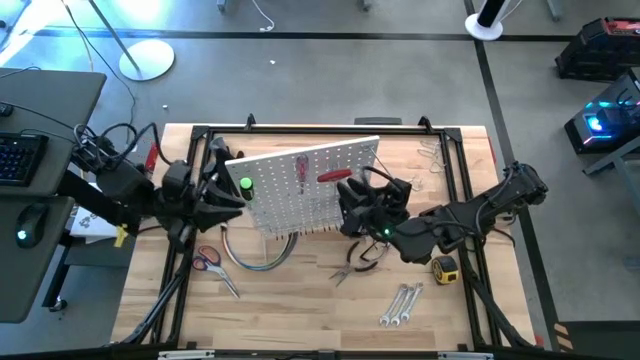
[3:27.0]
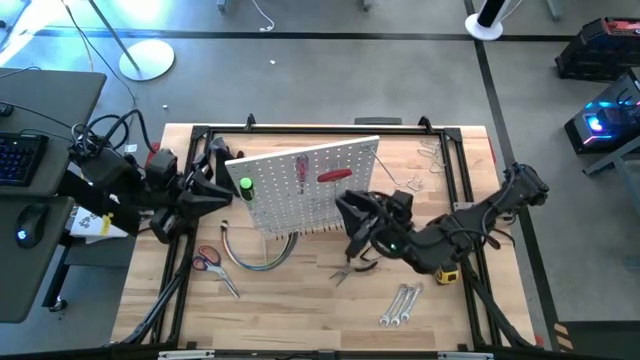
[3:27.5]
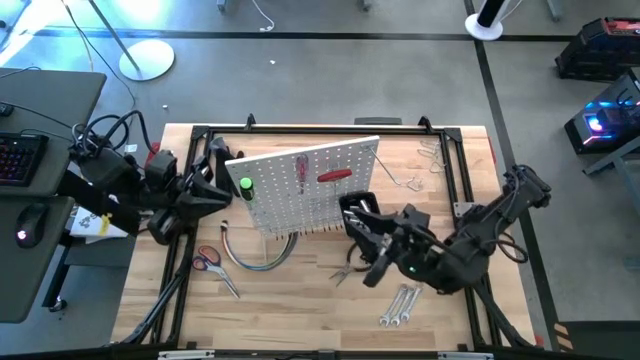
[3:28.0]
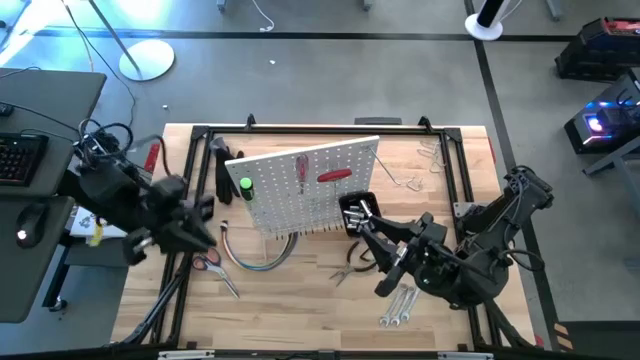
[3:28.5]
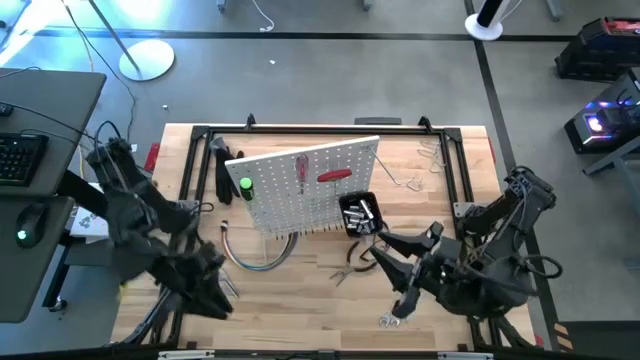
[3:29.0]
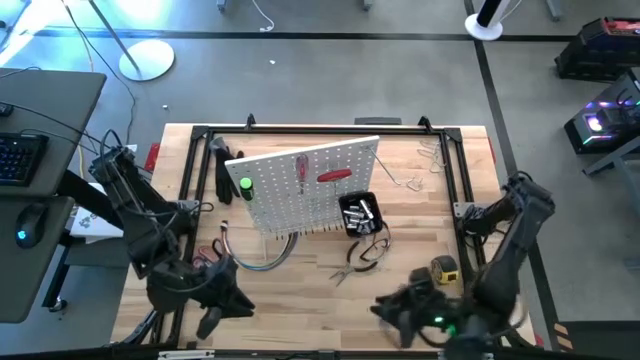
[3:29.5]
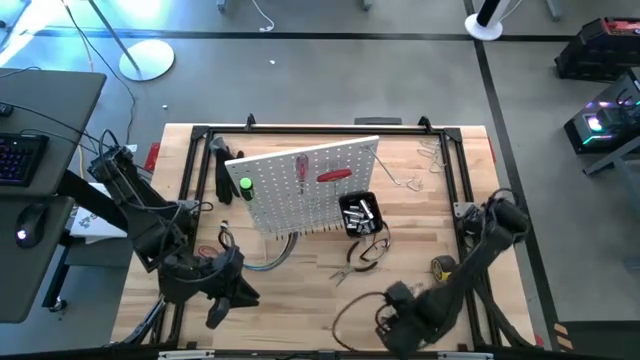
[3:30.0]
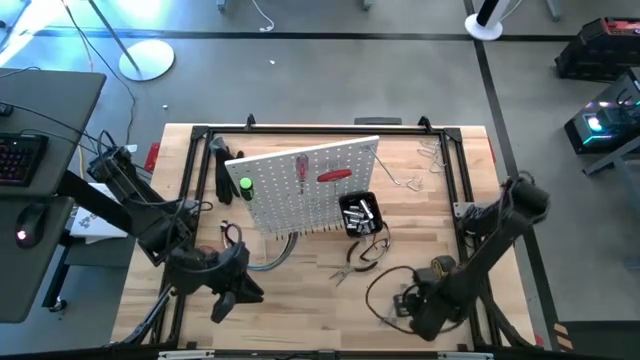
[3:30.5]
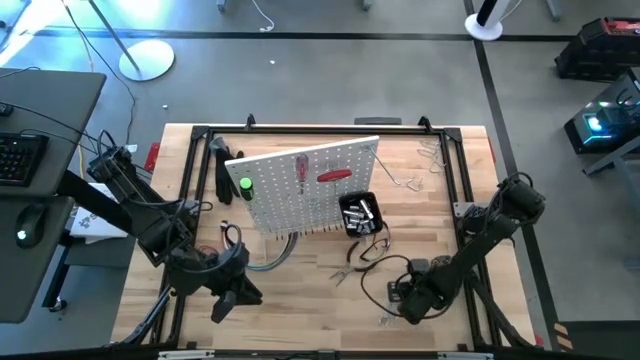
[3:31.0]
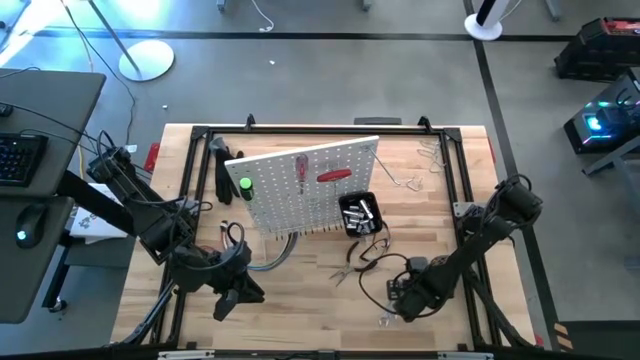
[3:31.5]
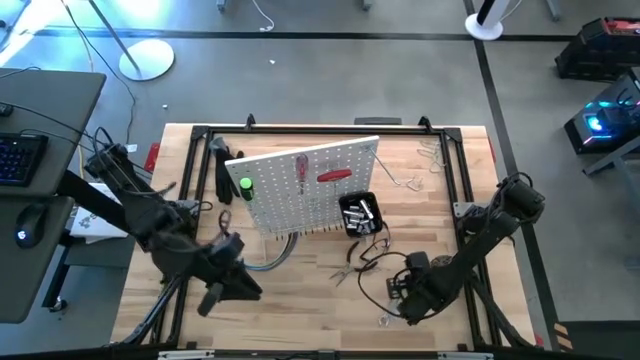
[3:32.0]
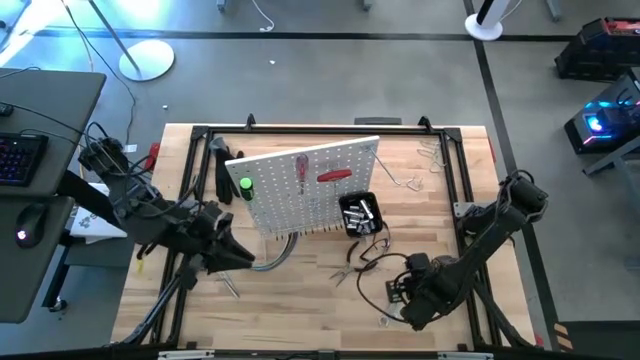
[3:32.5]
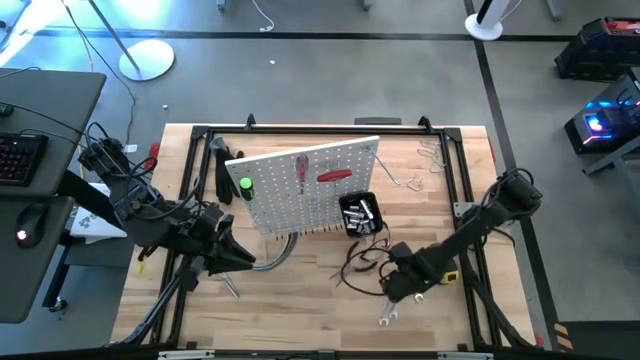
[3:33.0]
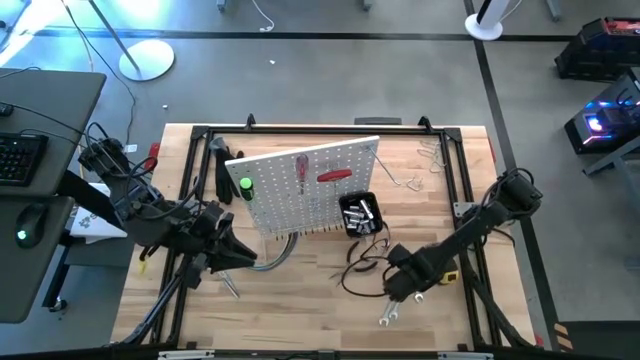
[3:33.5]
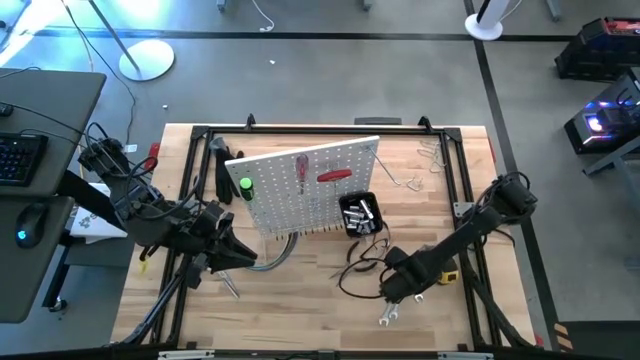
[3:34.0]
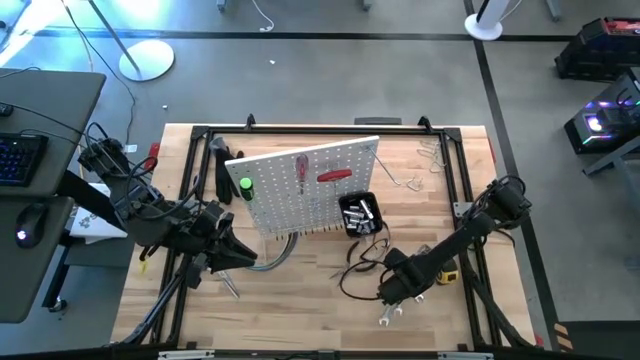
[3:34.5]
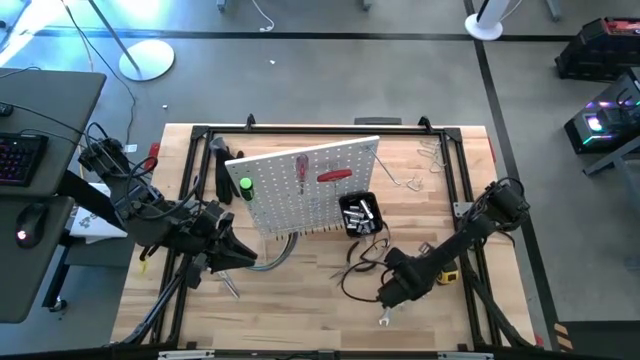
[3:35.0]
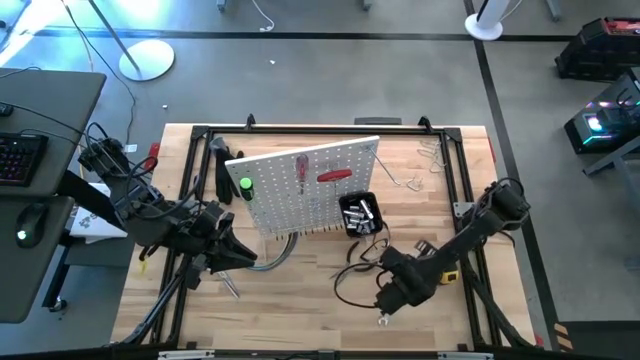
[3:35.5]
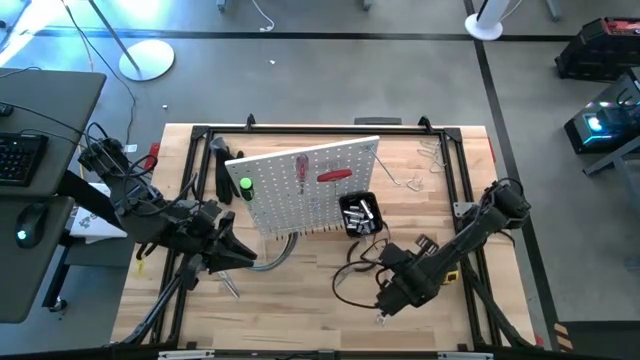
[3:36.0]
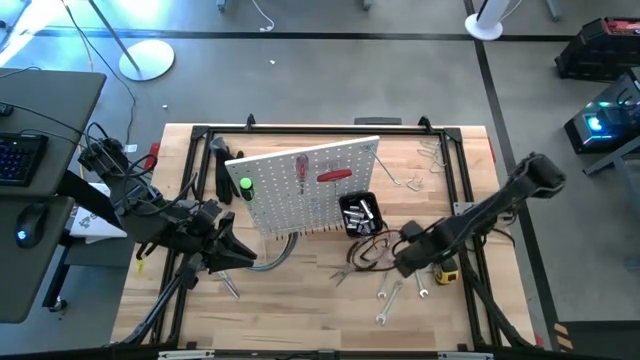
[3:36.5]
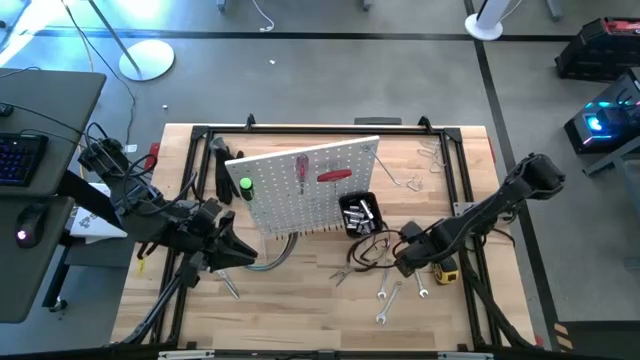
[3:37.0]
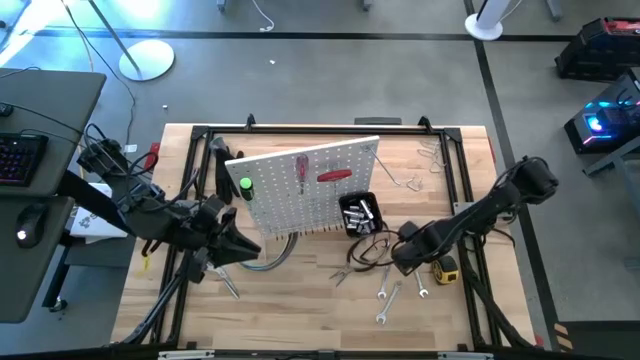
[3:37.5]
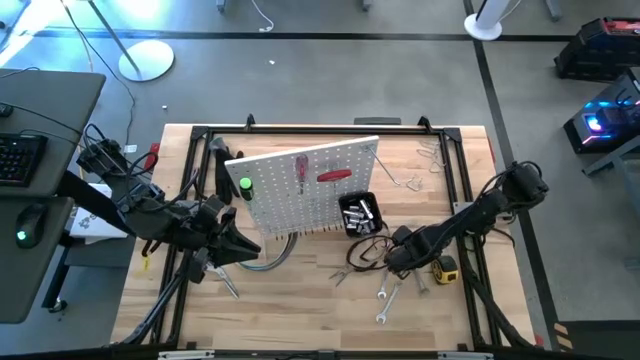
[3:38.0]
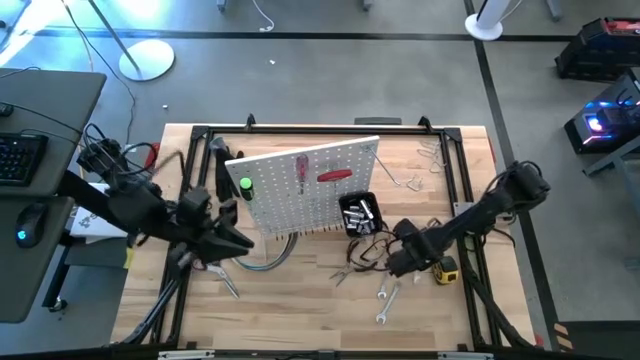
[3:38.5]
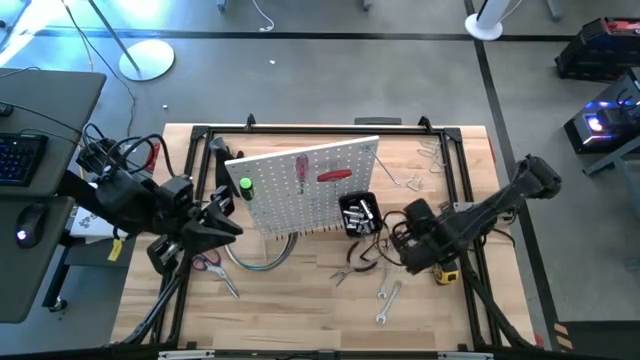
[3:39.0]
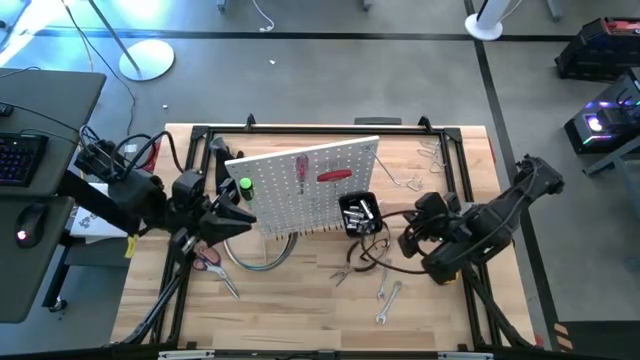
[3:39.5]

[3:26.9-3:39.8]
Task: Hang tools onto peg board
Hang the wrench on the peg board

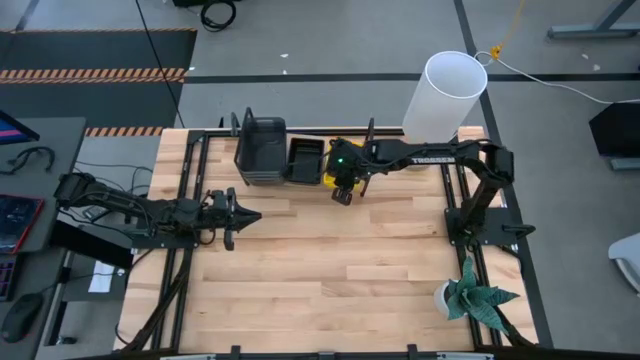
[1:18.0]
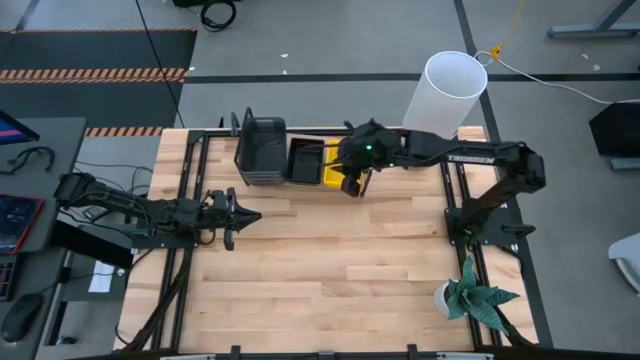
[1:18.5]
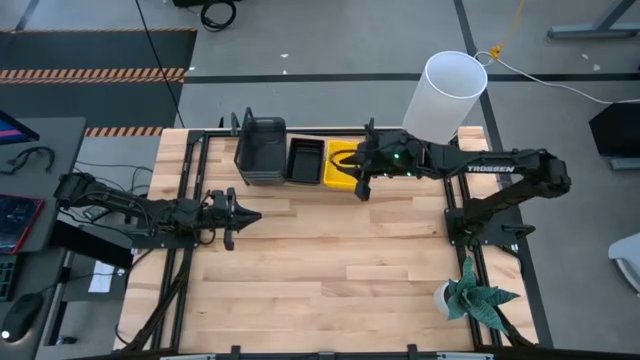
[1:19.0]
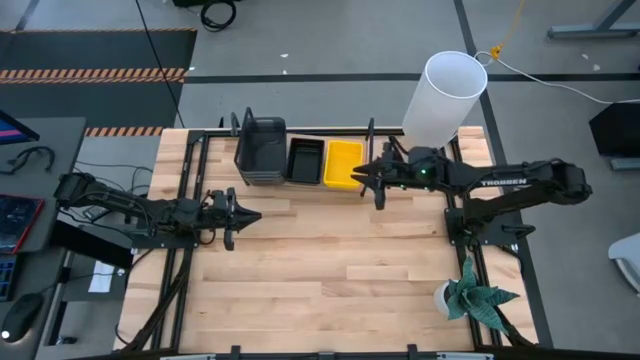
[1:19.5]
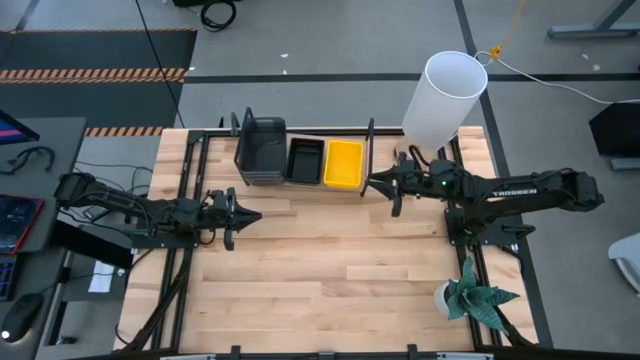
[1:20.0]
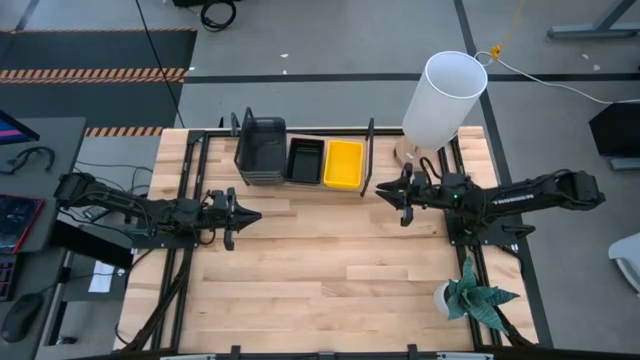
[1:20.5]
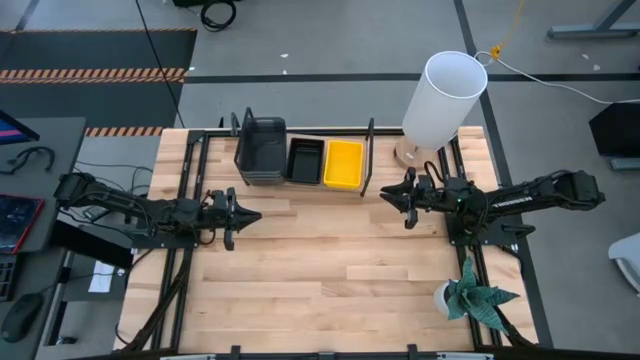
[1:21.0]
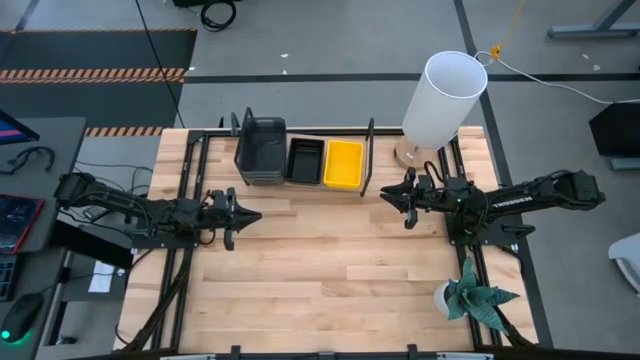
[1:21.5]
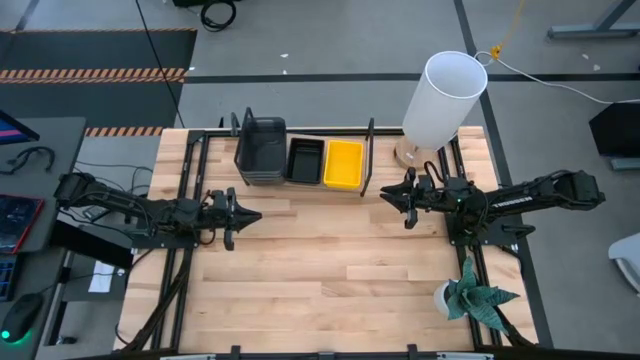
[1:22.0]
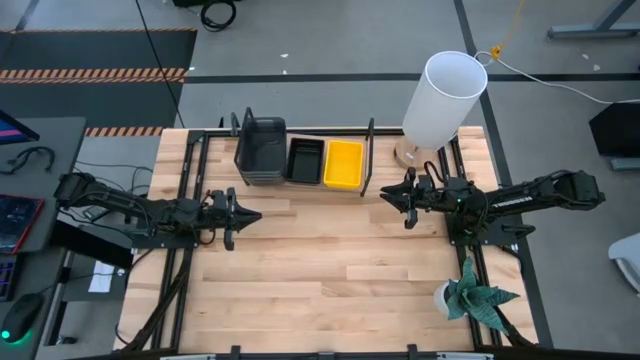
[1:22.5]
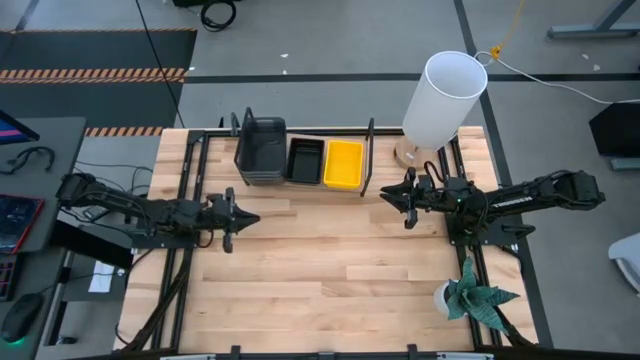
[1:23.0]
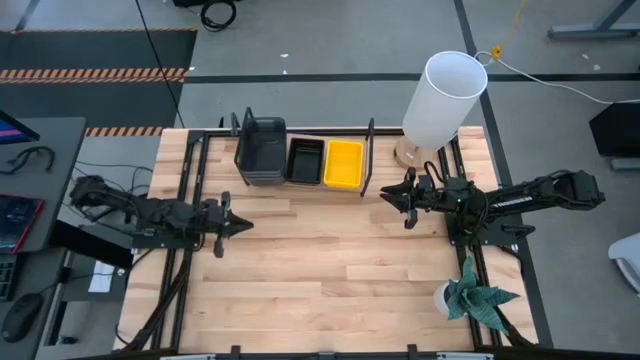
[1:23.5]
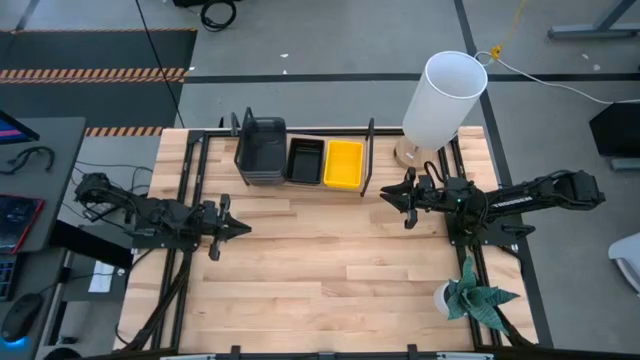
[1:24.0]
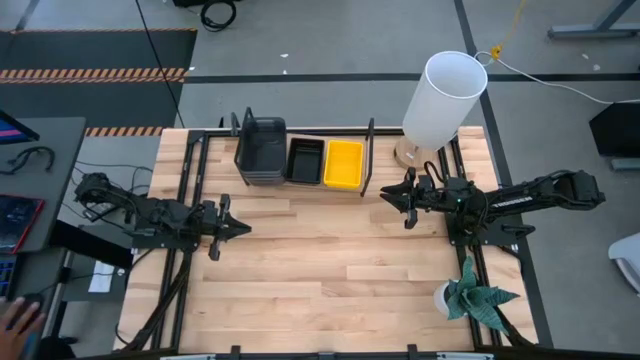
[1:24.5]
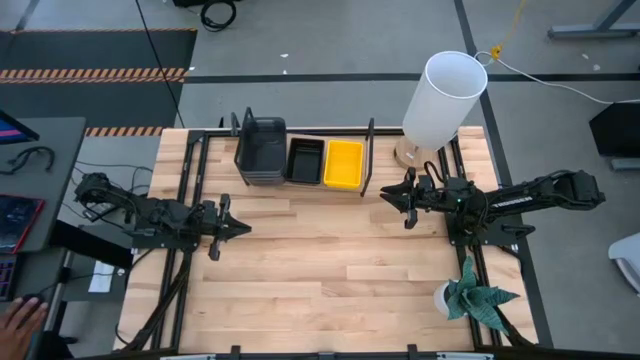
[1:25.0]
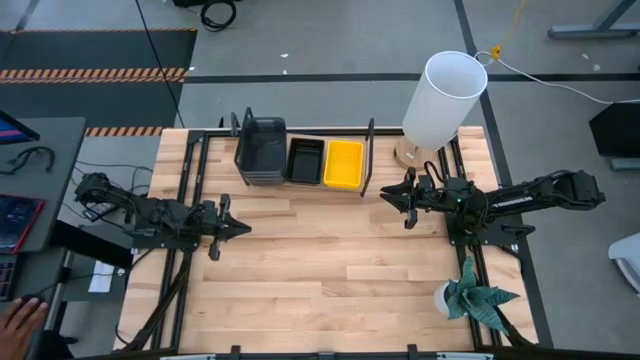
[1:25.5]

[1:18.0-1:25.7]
Task: Stack baskets on shelf by color
Return to Home Position
